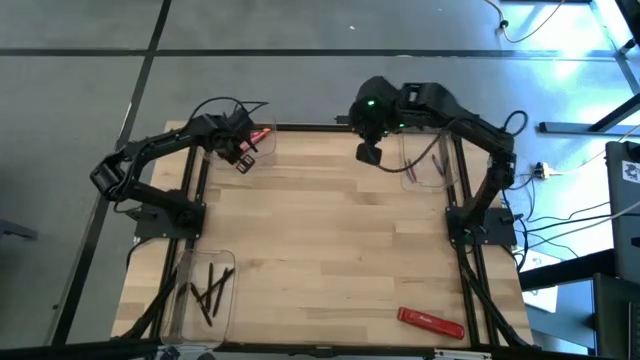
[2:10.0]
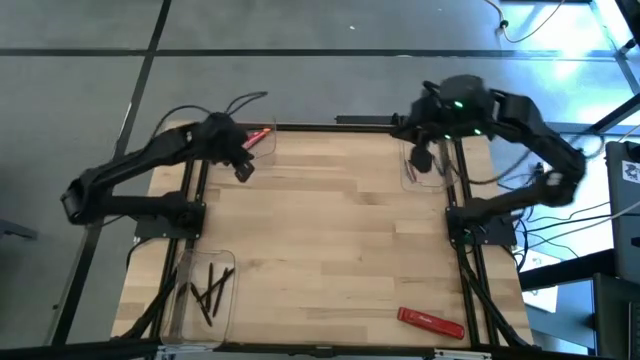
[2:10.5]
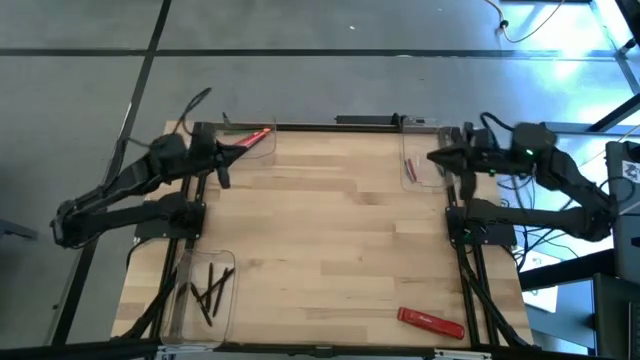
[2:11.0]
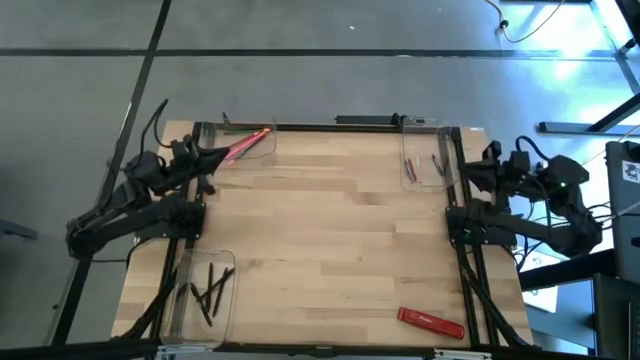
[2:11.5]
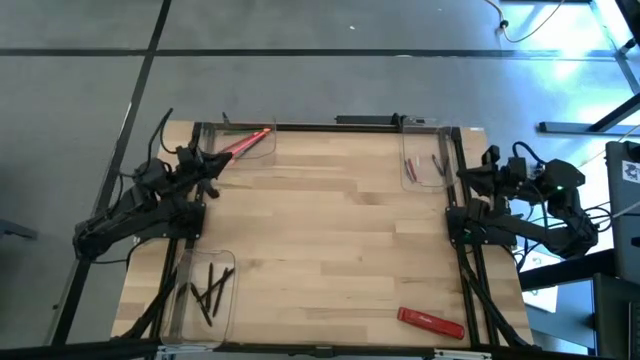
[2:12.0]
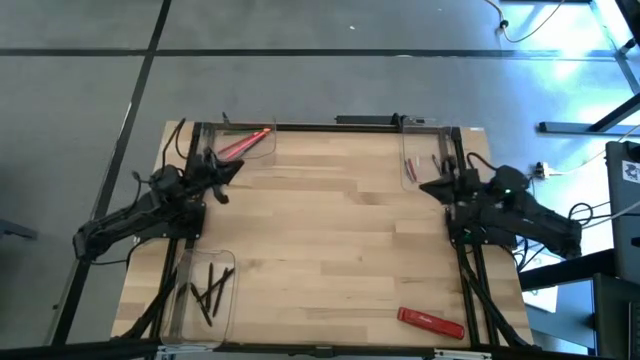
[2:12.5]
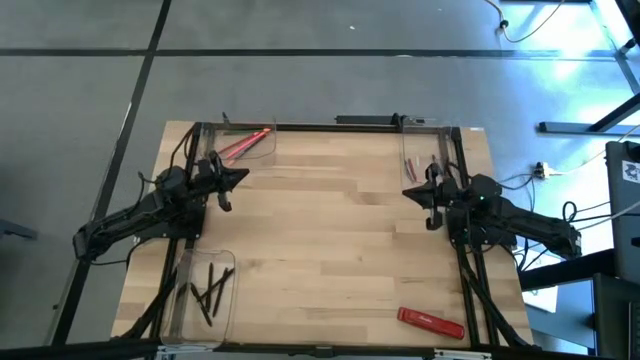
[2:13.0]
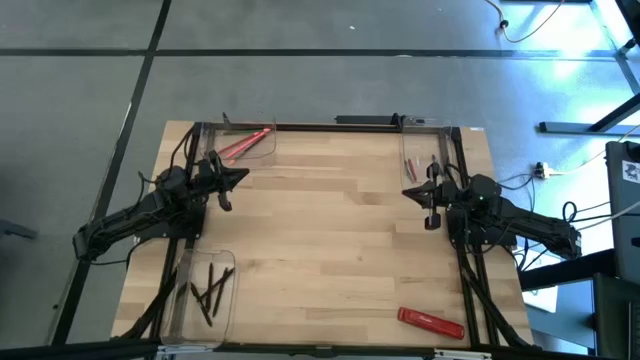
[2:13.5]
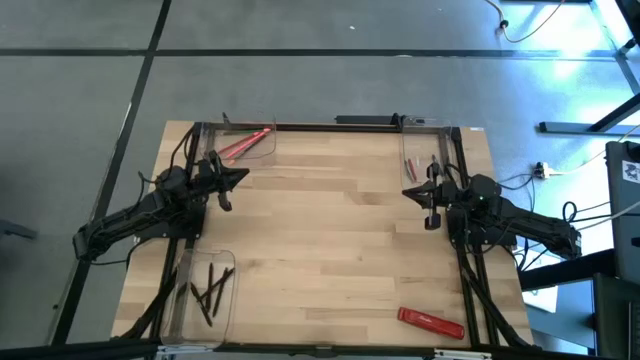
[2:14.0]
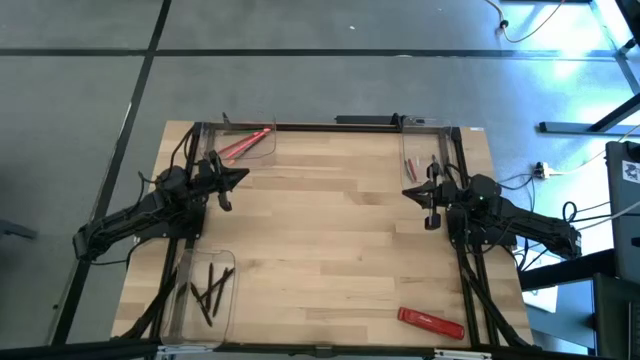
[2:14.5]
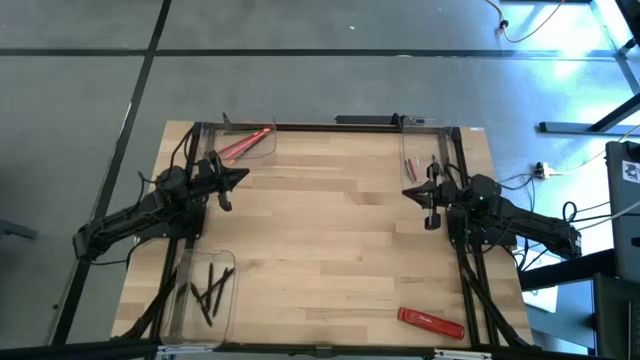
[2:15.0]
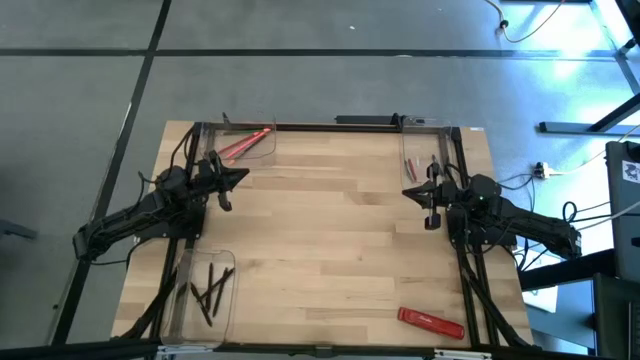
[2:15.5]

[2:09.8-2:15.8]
Task: Sort crayons/erasers/pens/pencils in bins
Return to Home Position

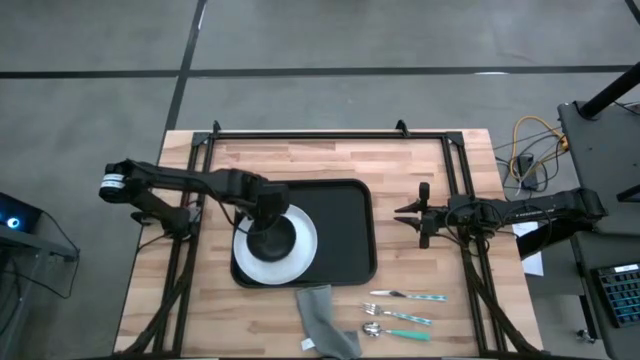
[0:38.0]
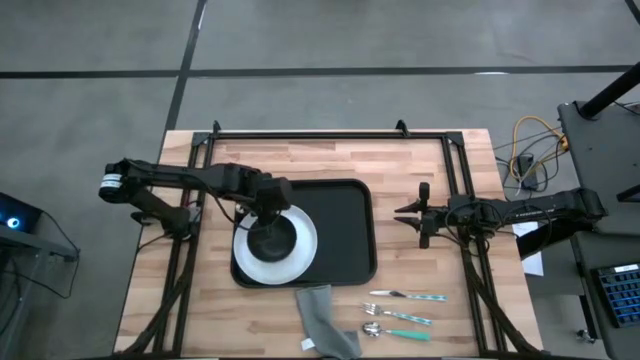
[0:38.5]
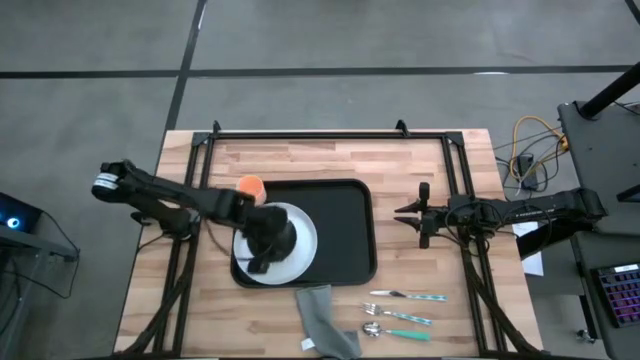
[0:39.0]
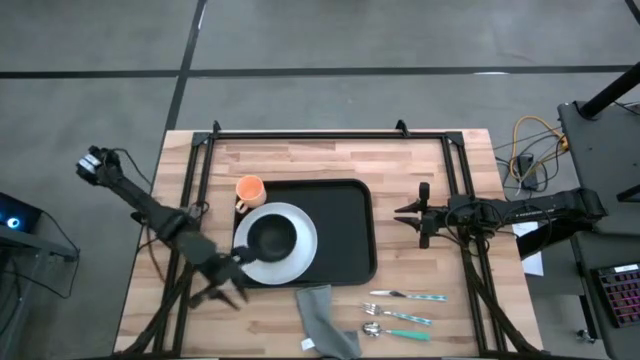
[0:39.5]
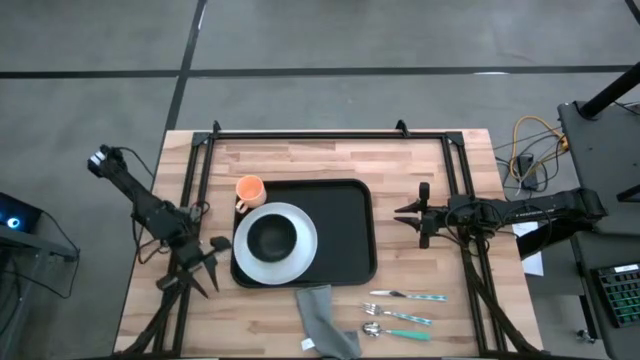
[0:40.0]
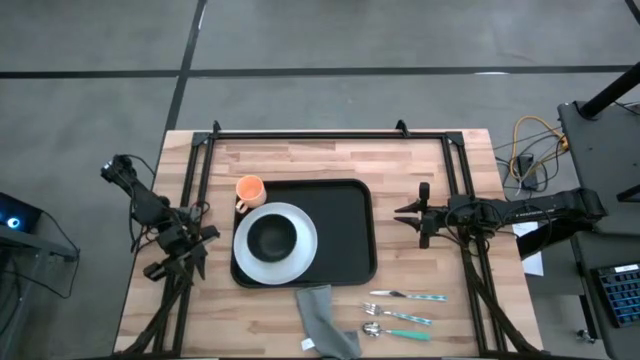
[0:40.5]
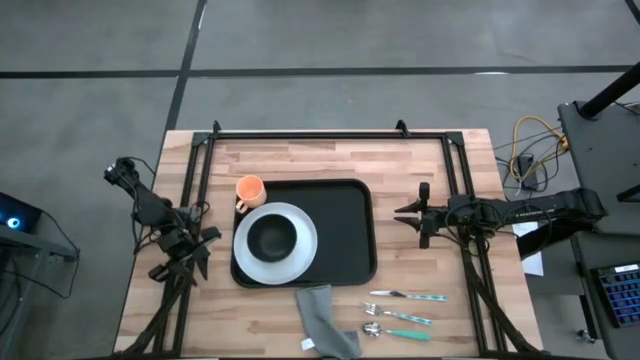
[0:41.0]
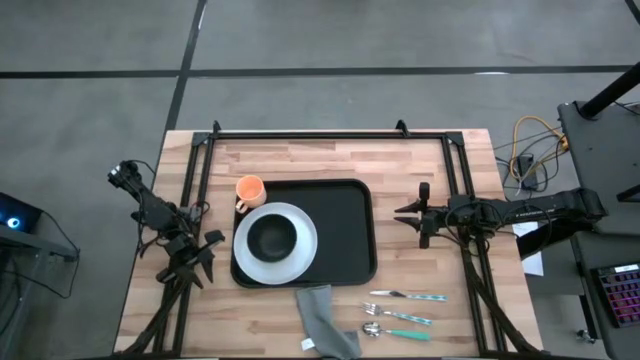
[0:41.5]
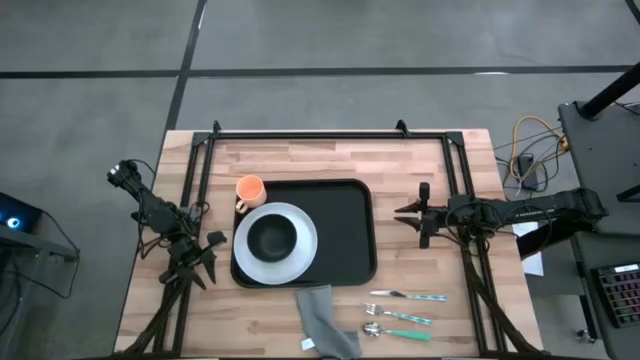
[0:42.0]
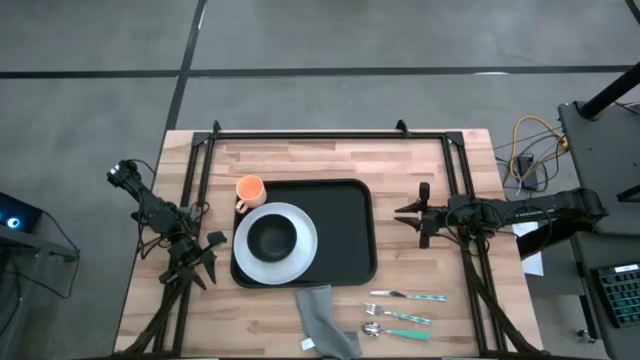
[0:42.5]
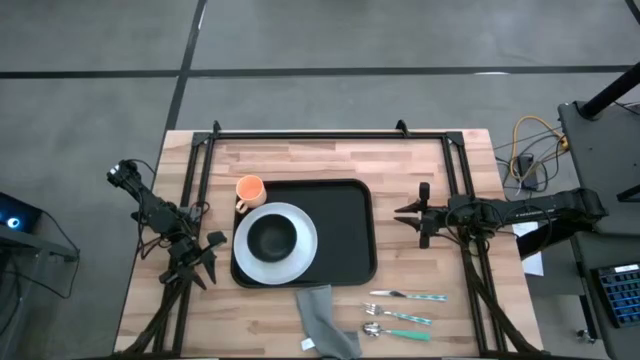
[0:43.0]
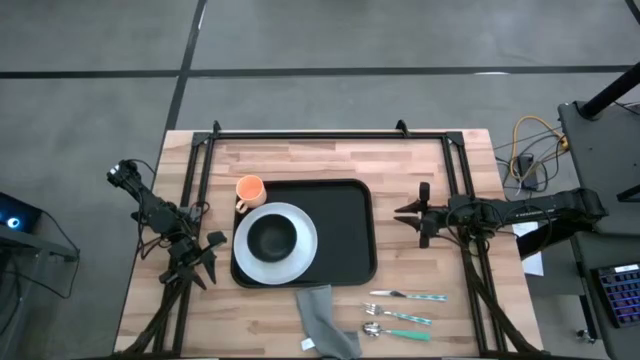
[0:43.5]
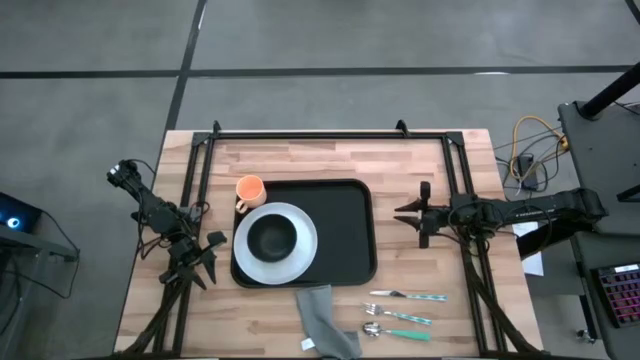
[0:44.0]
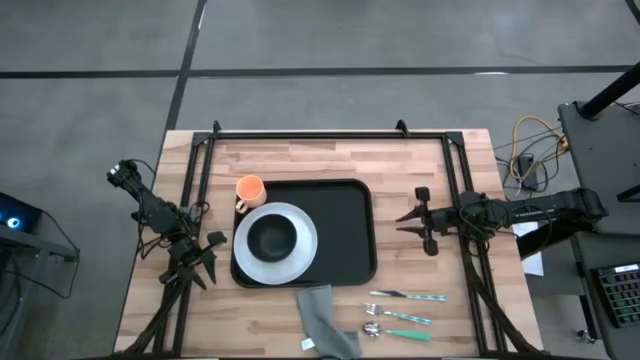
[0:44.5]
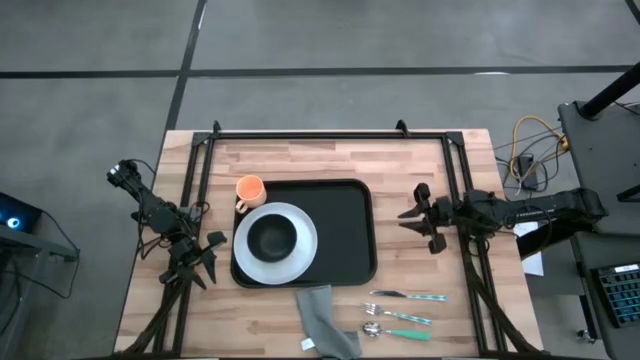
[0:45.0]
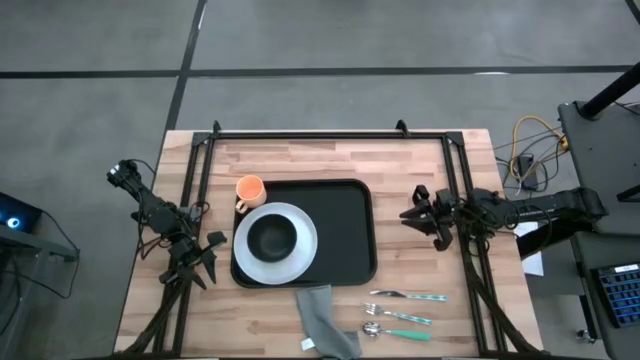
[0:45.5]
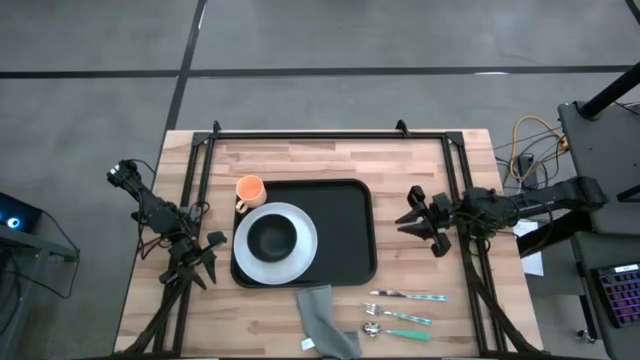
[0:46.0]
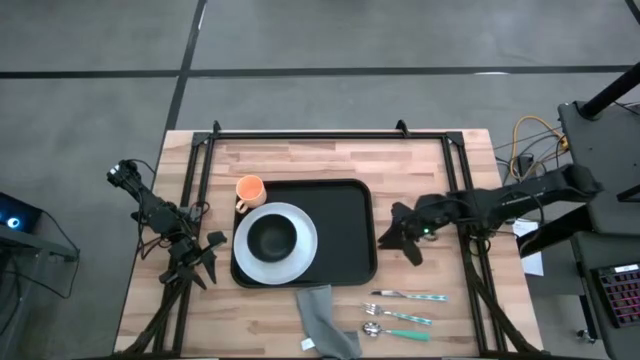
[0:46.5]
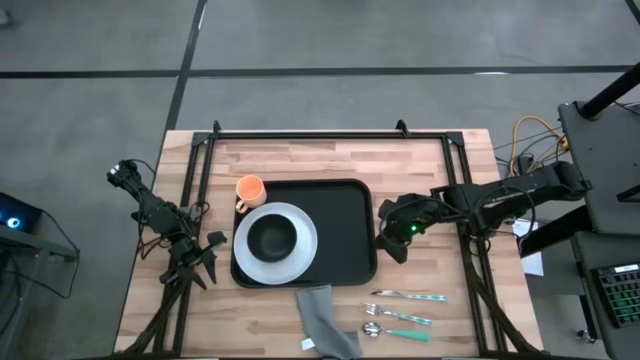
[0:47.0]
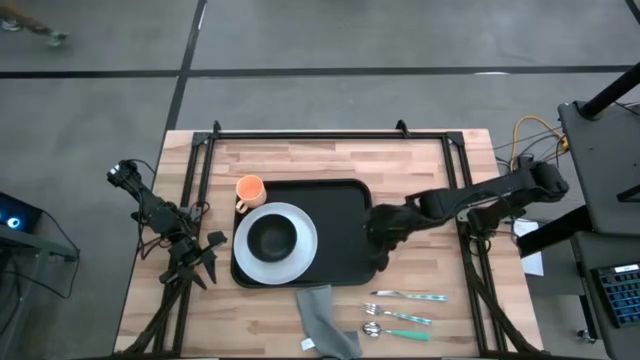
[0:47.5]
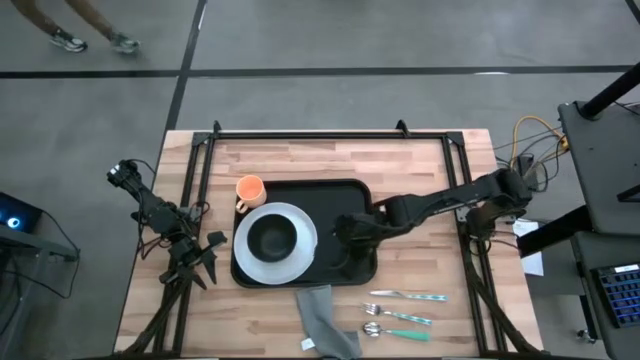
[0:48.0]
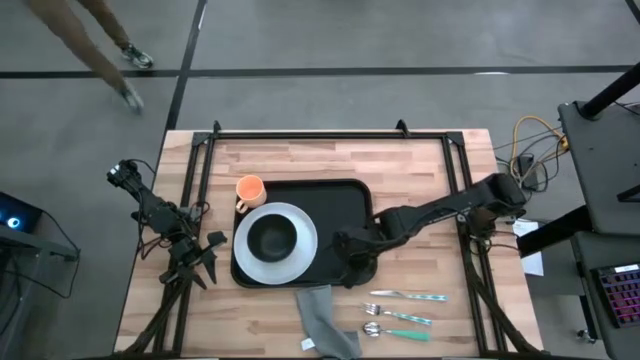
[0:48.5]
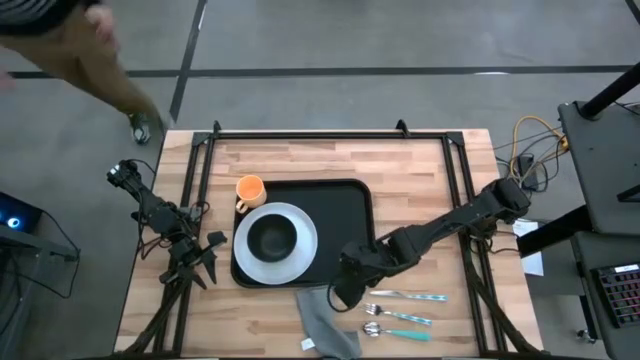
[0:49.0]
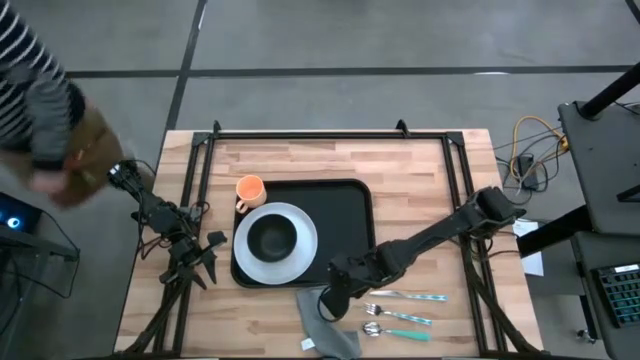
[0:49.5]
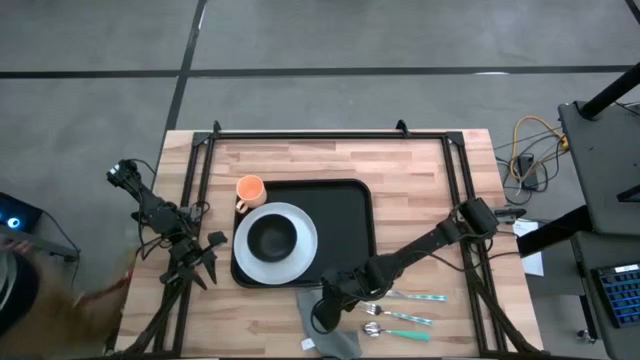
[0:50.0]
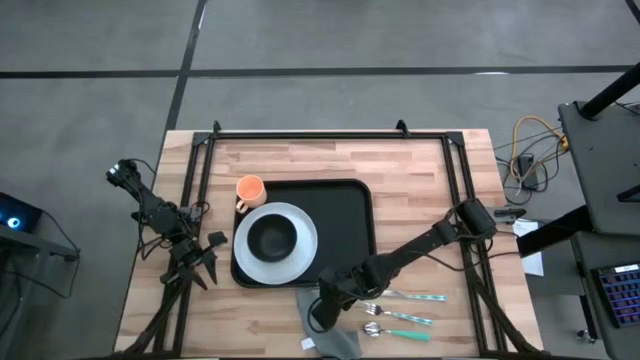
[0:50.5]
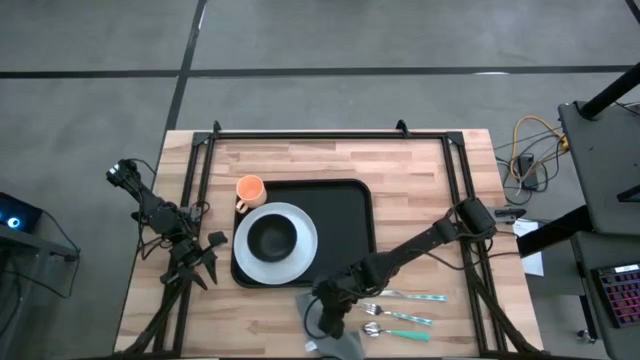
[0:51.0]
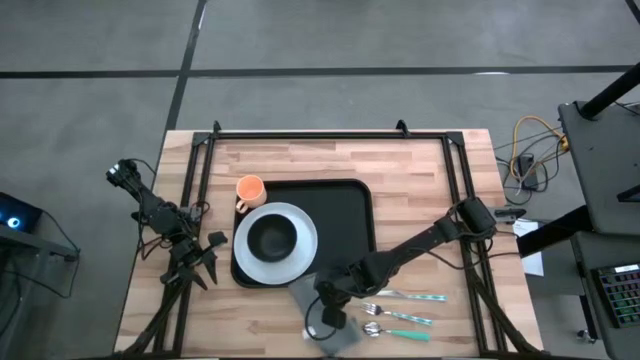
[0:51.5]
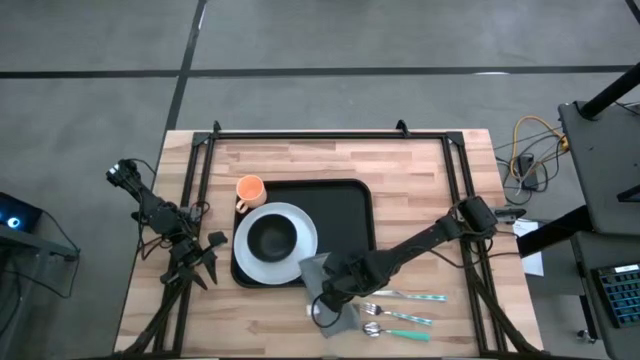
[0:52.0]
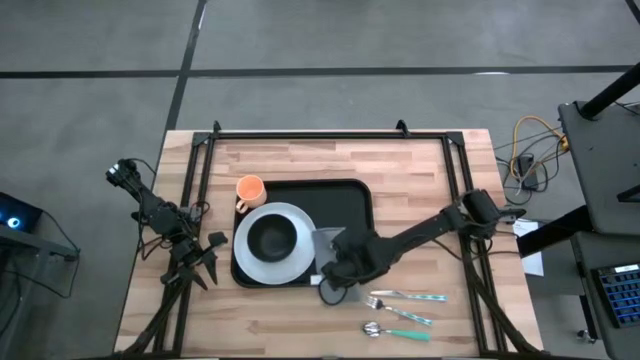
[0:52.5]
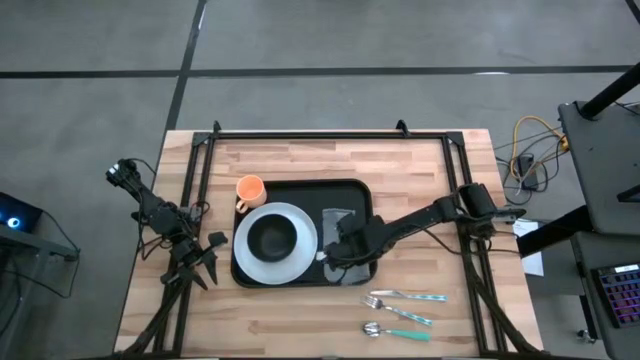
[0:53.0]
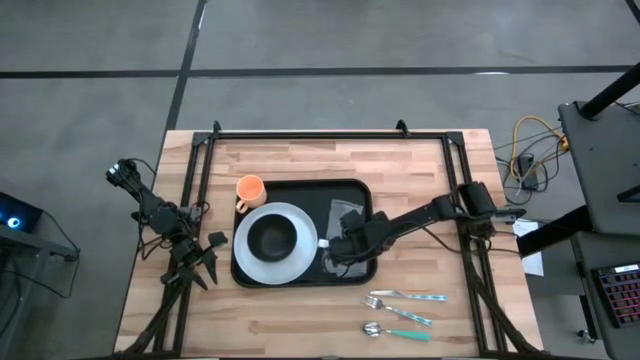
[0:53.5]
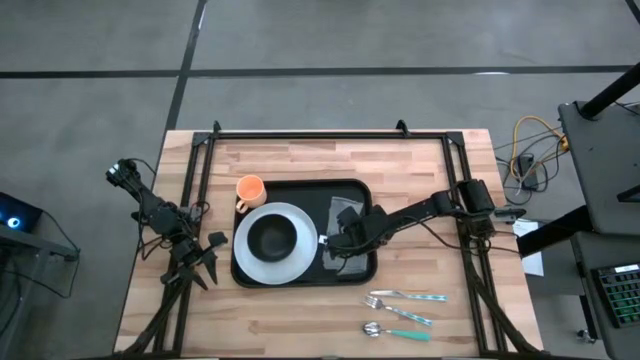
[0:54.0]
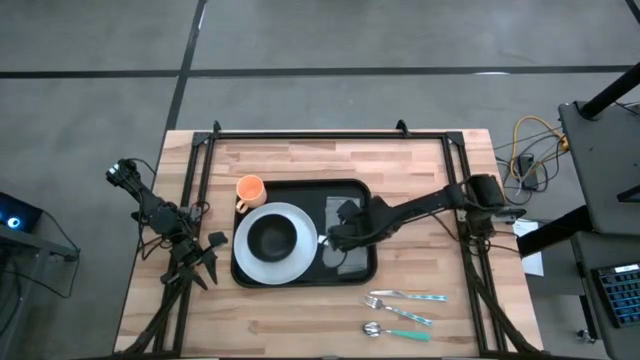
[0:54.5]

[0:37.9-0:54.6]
Task: Set up tray
Put the gray napkin on the black tray to the right of the white plate
